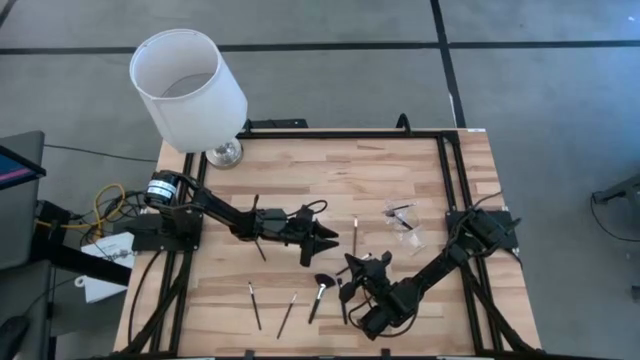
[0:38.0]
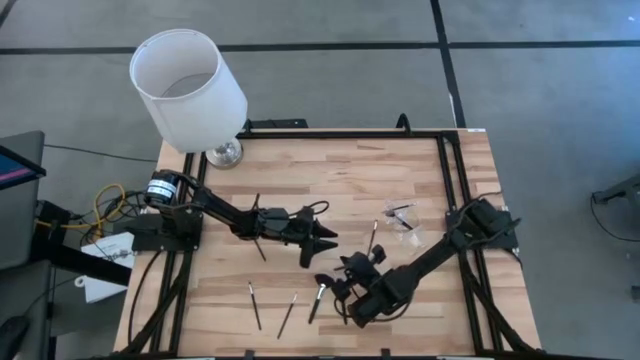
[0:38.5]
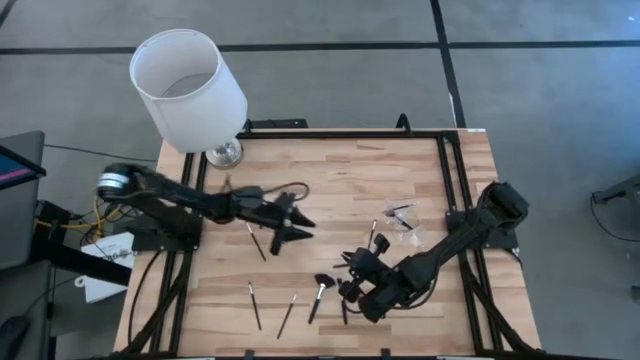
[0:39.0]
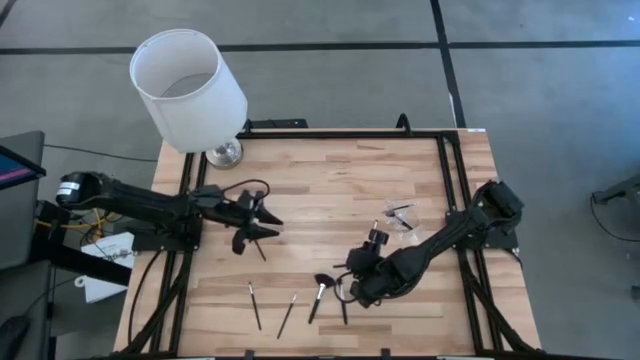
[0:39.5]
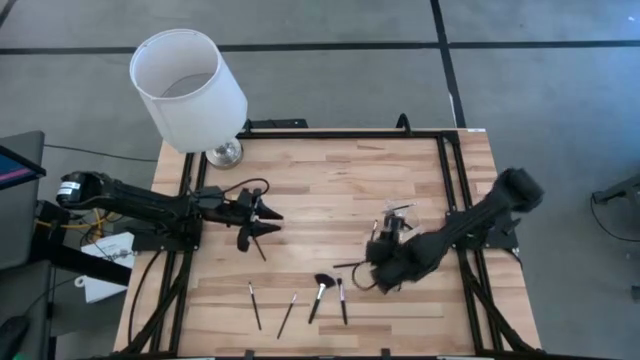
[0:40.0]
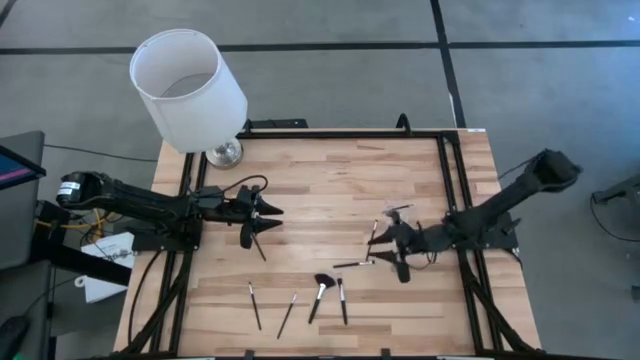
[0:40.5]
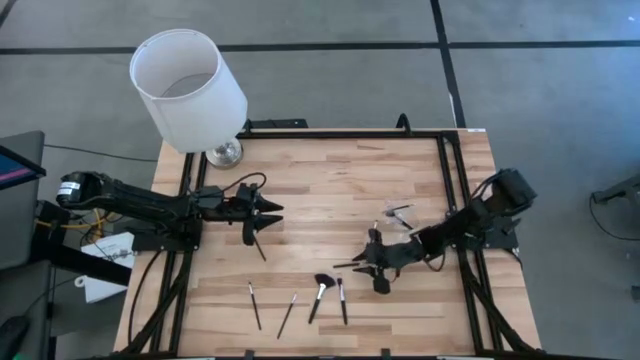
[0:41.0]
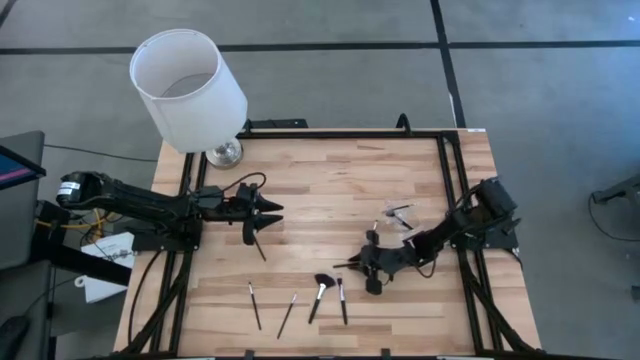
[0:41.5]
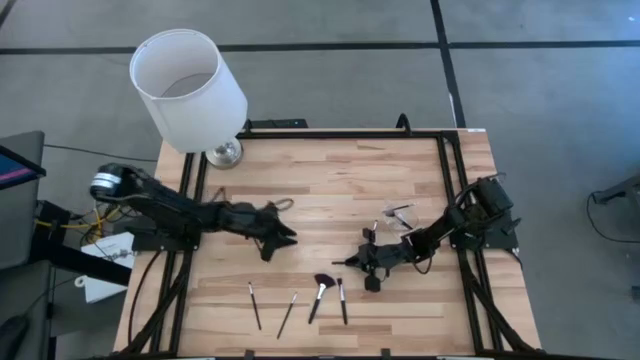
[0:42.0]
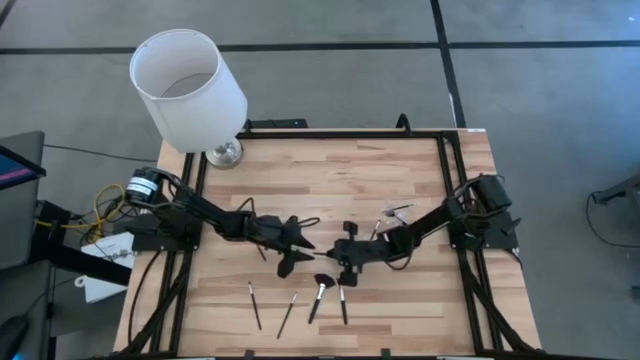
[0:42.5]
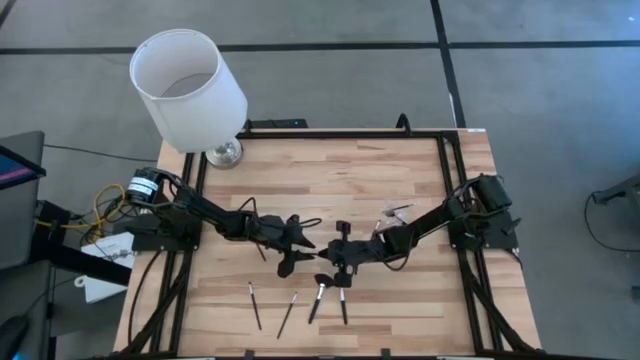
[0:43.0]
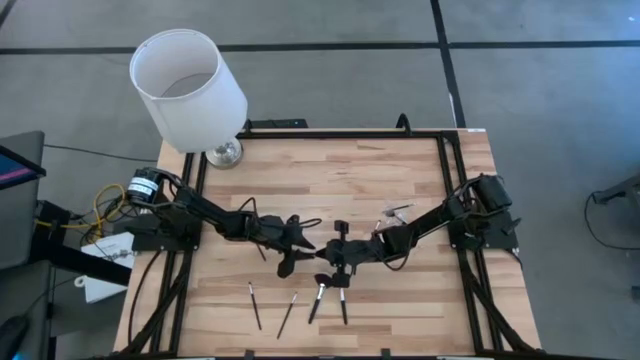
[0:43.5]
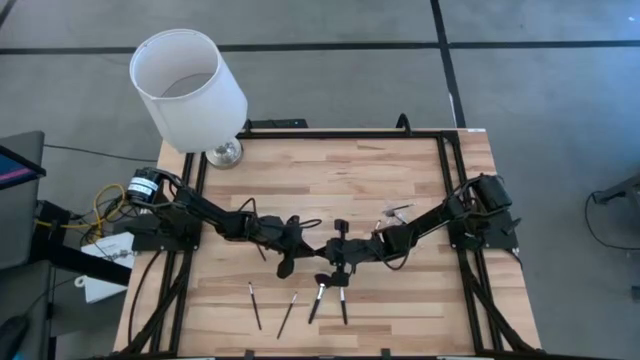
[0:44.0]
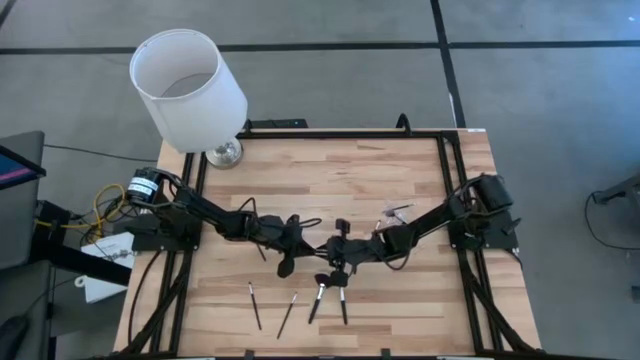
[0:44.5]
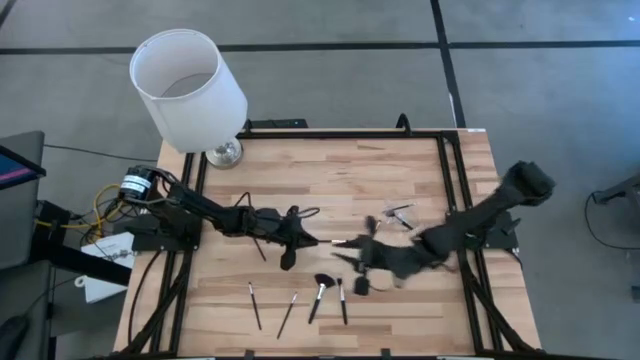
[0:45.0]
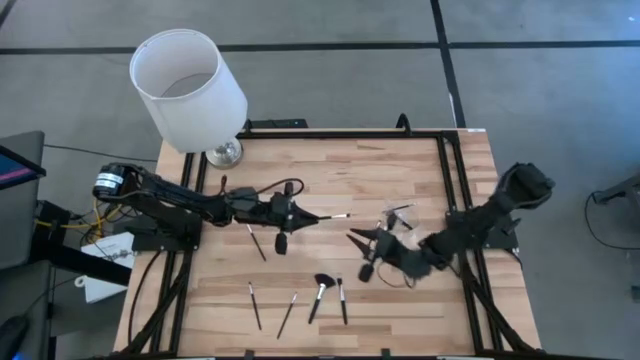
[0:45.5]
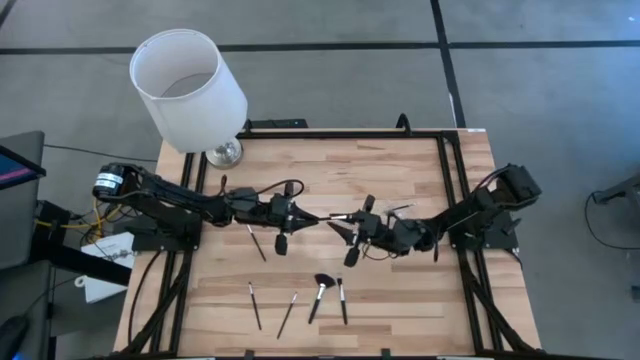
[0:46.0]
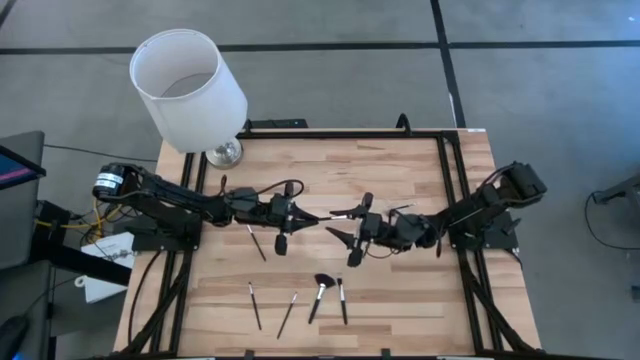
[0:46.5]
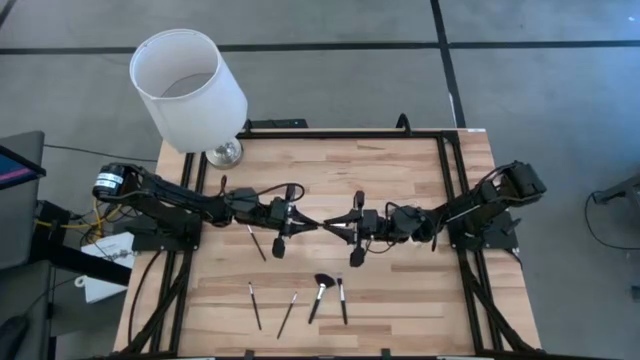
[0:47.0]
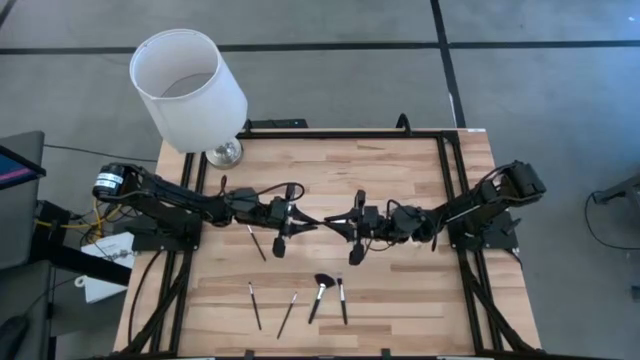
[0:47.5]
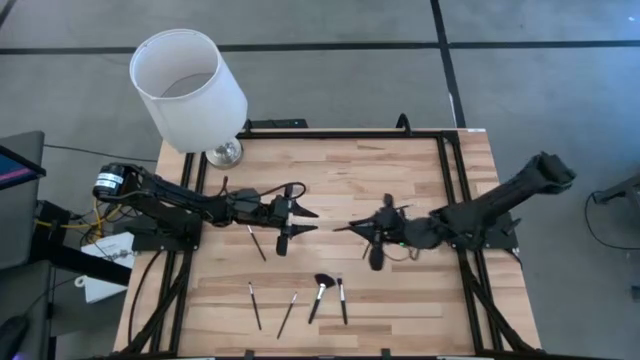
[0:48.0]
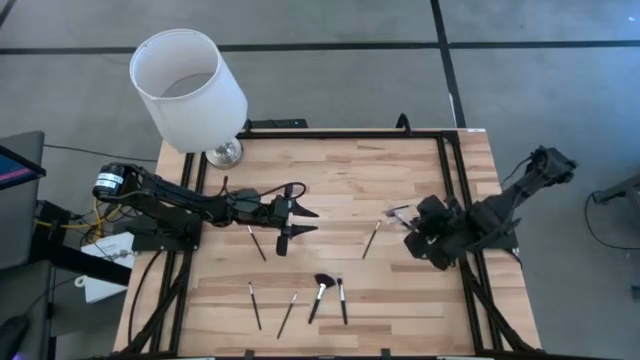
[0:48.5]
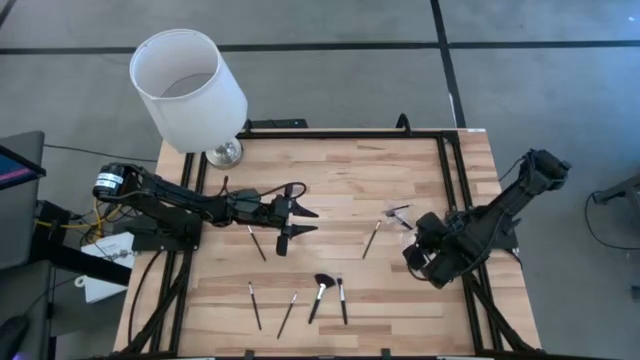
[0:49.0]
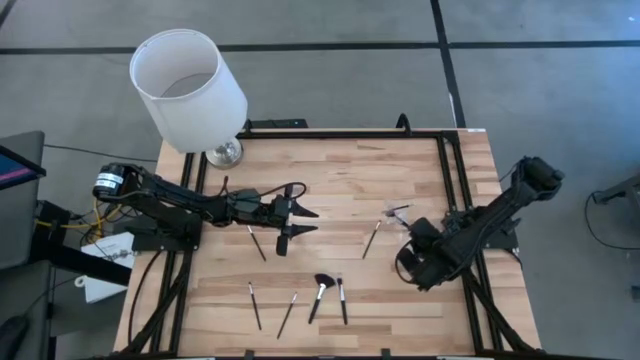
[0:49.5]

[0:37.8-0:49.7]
Task: Put items in baskets/containers
Put the blush brush into the transparent organizer

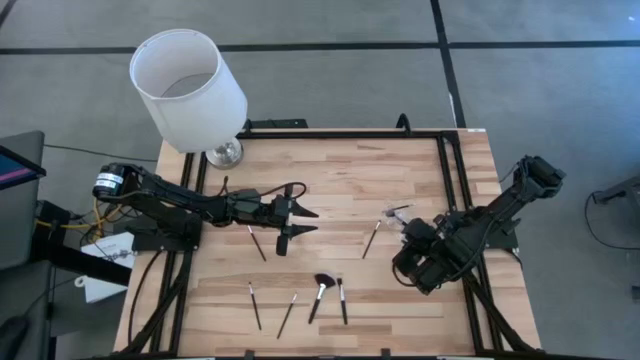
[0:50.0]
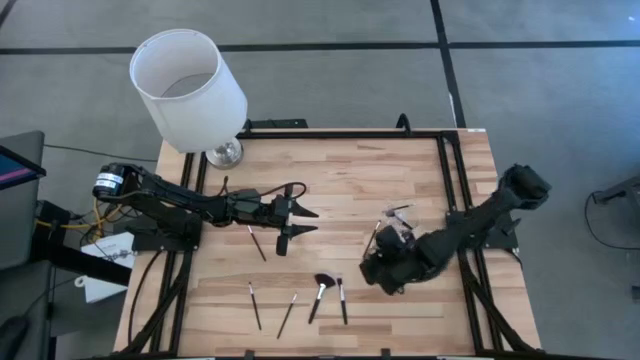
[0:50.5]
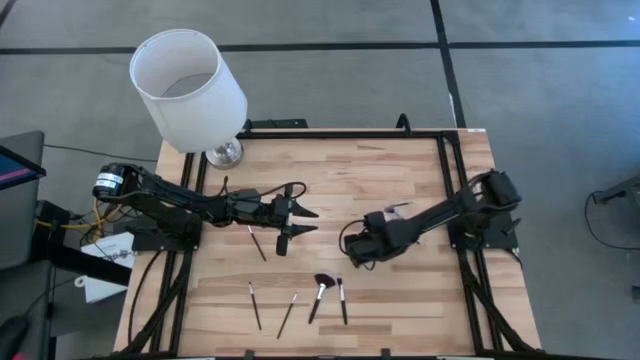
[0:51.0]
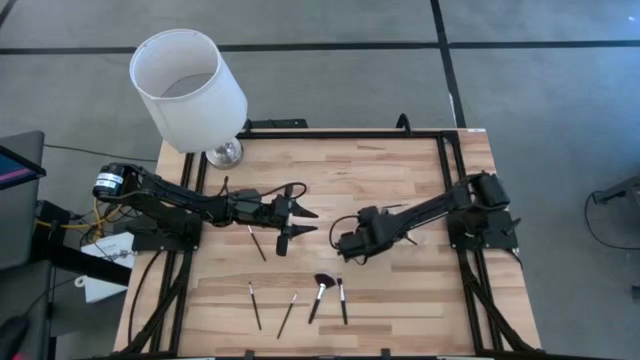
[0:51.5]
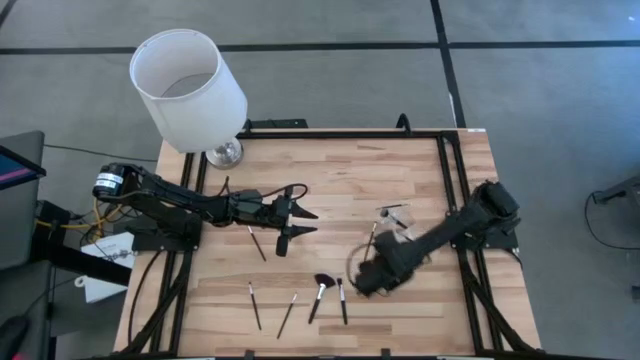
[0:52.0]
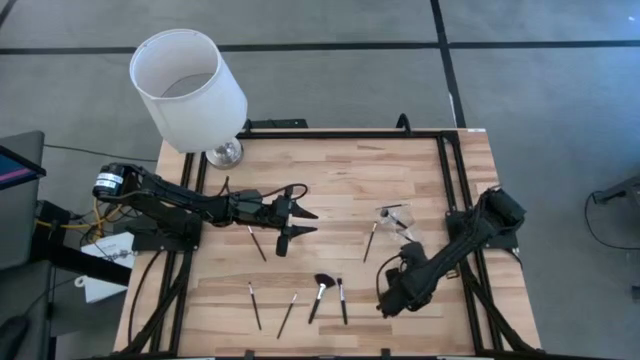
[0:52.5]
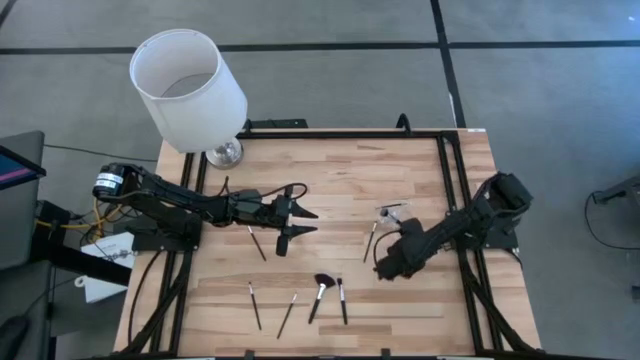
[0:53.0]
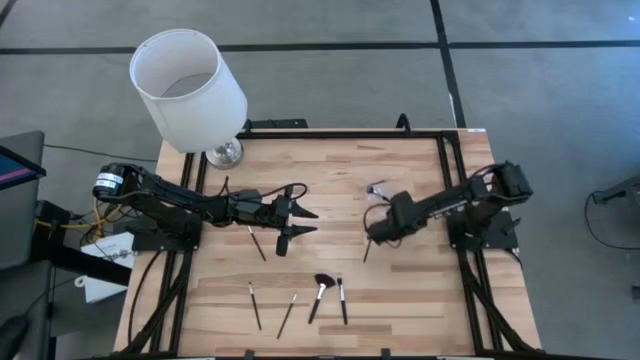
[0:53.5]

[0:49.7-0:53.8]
Adjust the transparent organizer
